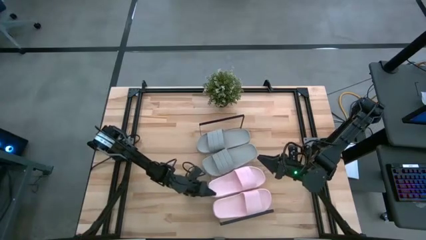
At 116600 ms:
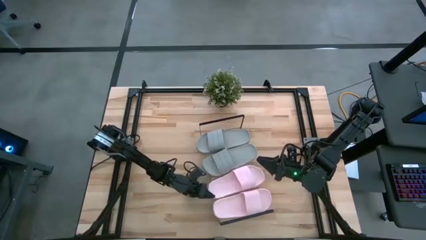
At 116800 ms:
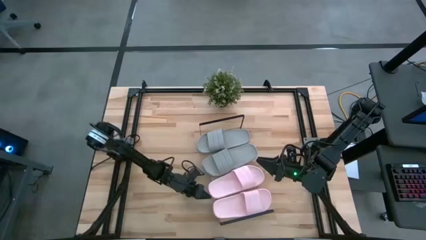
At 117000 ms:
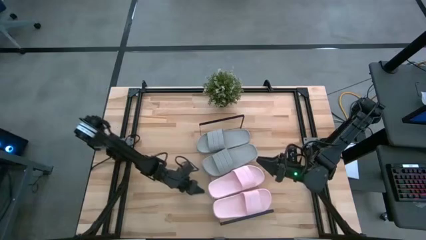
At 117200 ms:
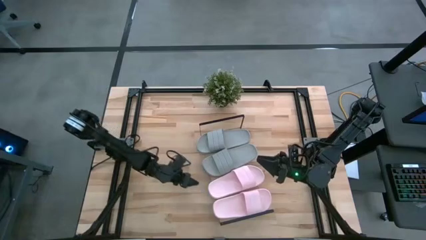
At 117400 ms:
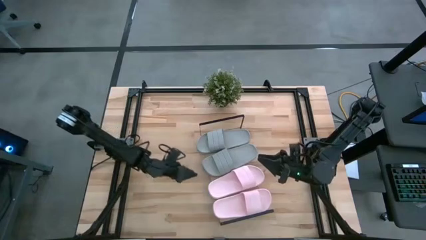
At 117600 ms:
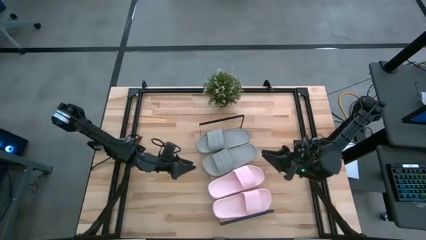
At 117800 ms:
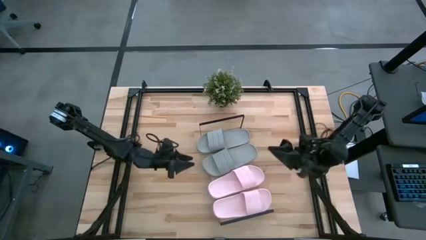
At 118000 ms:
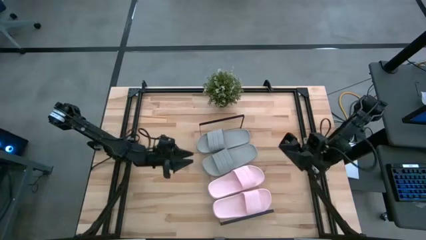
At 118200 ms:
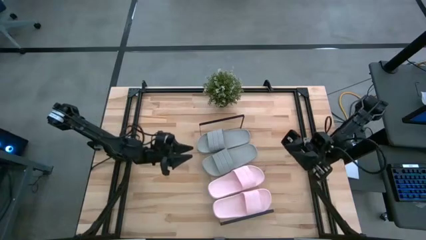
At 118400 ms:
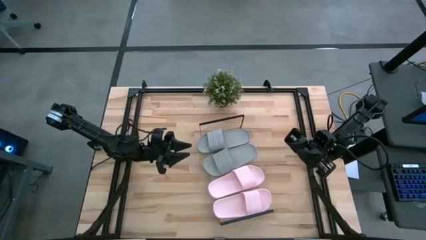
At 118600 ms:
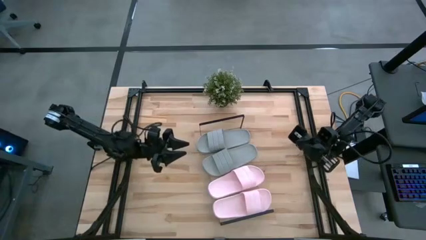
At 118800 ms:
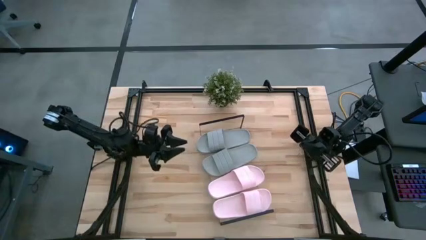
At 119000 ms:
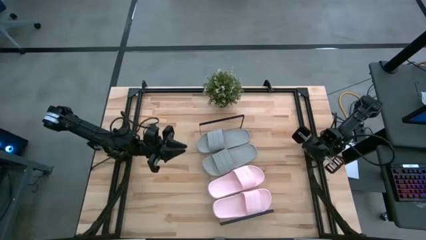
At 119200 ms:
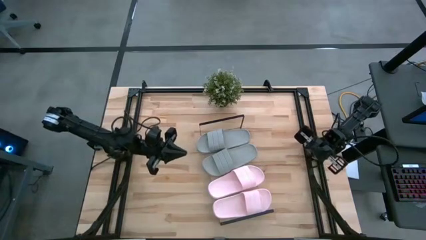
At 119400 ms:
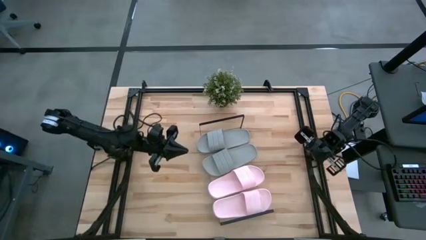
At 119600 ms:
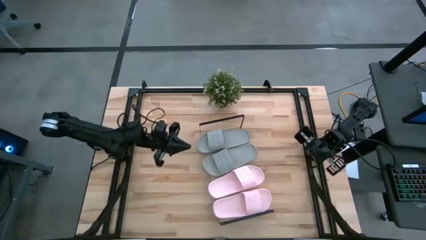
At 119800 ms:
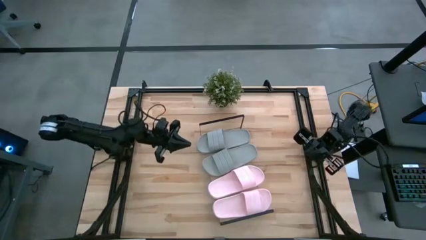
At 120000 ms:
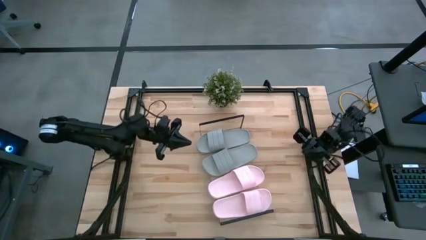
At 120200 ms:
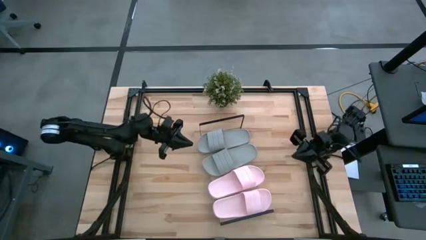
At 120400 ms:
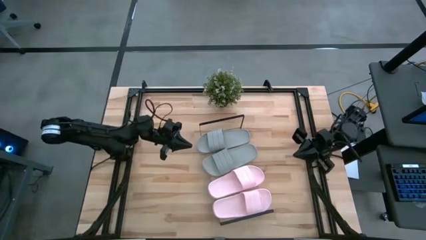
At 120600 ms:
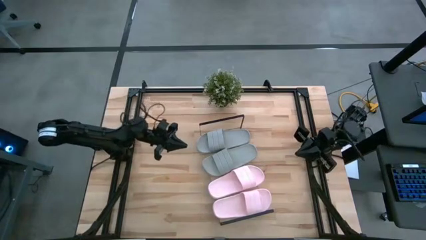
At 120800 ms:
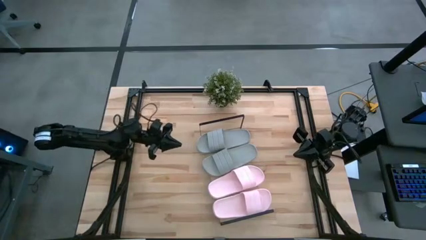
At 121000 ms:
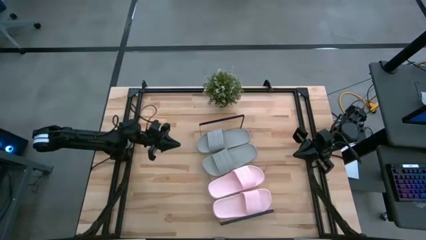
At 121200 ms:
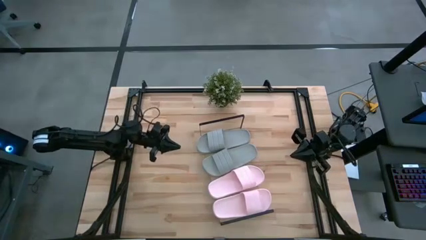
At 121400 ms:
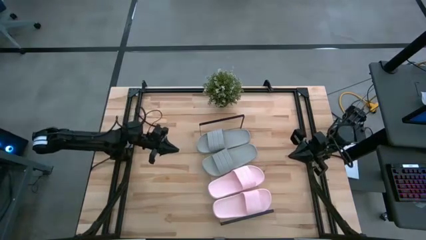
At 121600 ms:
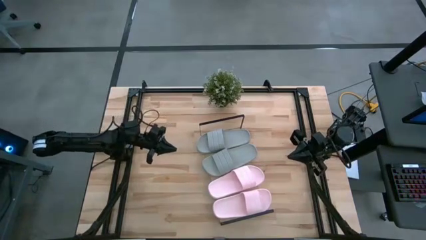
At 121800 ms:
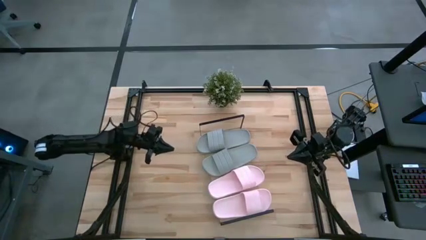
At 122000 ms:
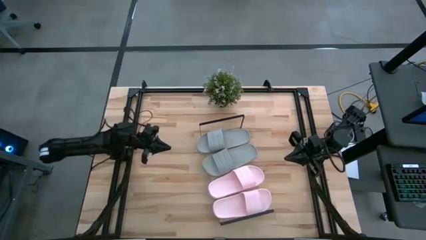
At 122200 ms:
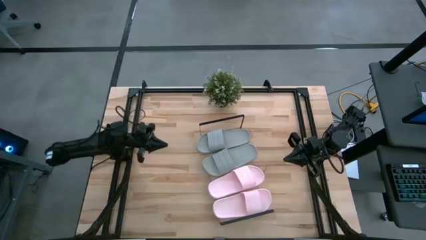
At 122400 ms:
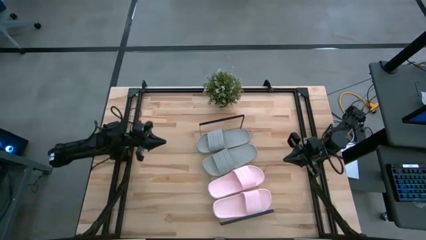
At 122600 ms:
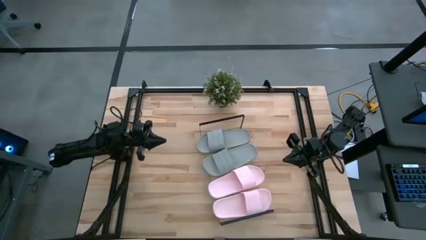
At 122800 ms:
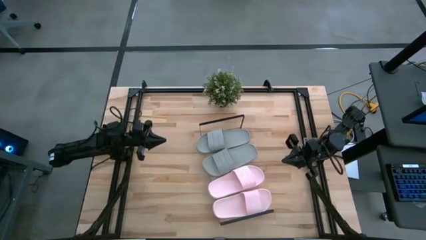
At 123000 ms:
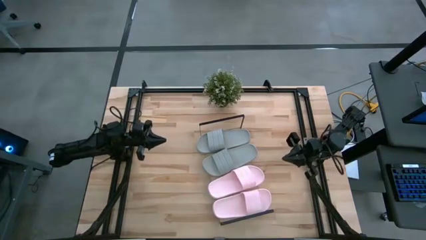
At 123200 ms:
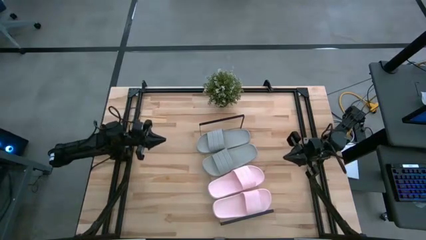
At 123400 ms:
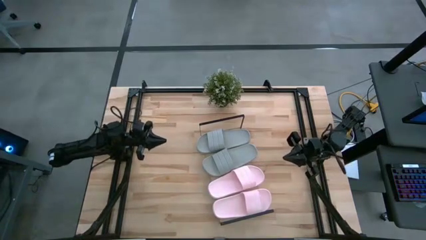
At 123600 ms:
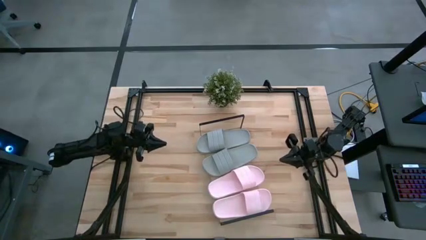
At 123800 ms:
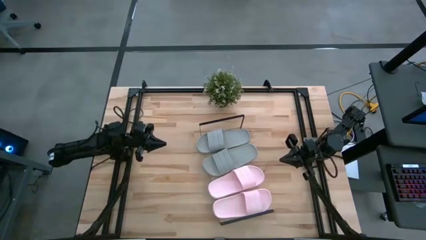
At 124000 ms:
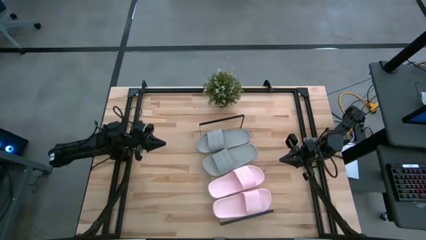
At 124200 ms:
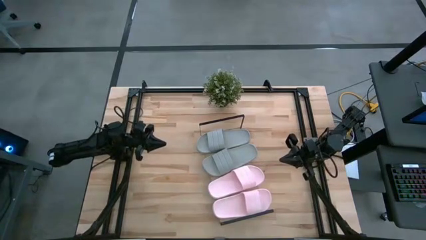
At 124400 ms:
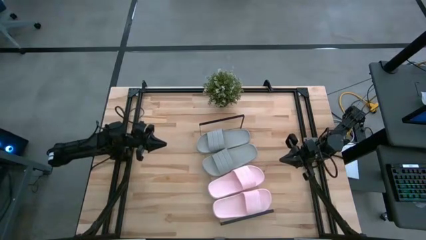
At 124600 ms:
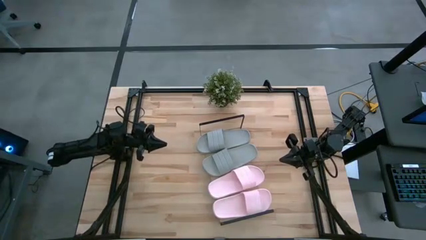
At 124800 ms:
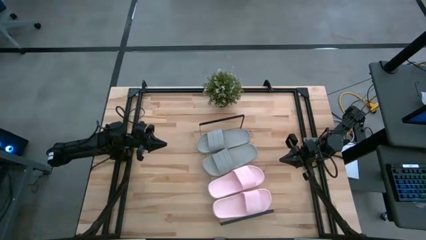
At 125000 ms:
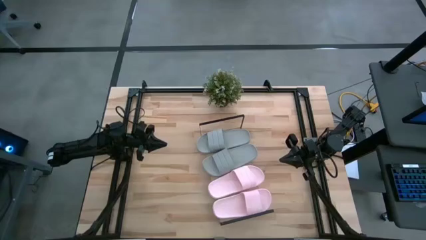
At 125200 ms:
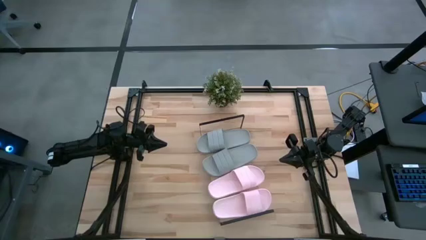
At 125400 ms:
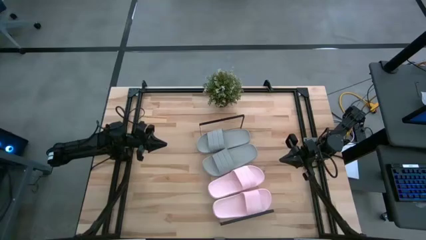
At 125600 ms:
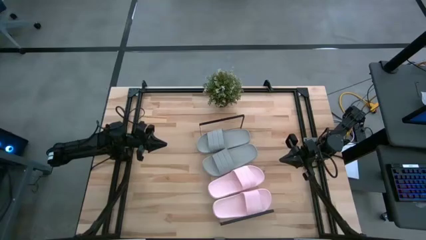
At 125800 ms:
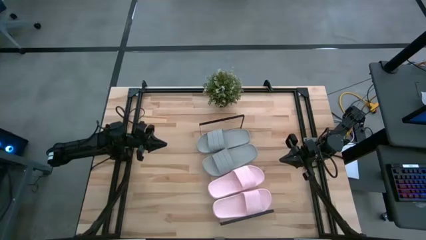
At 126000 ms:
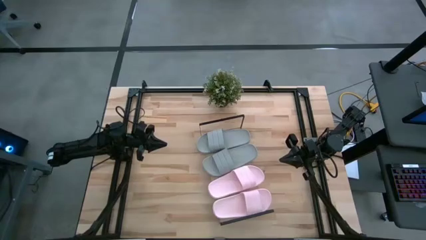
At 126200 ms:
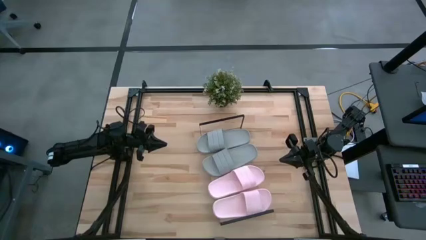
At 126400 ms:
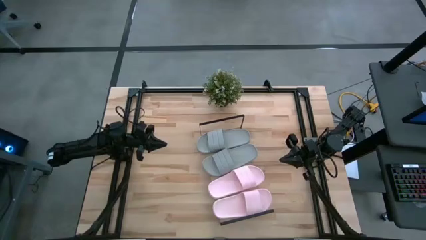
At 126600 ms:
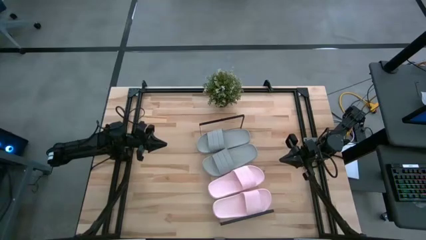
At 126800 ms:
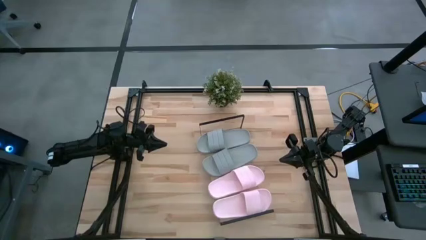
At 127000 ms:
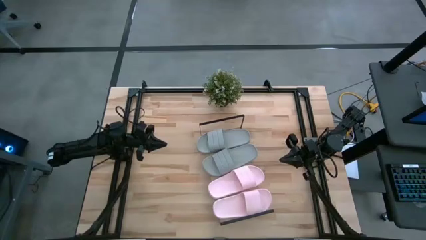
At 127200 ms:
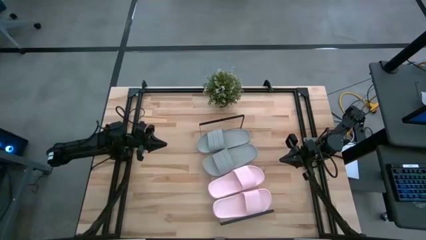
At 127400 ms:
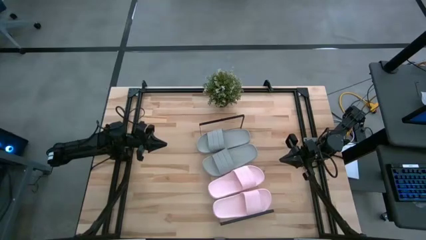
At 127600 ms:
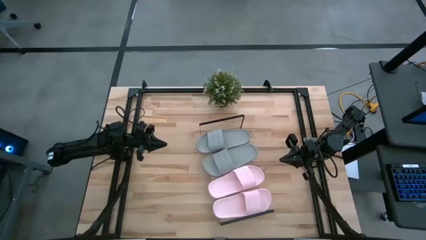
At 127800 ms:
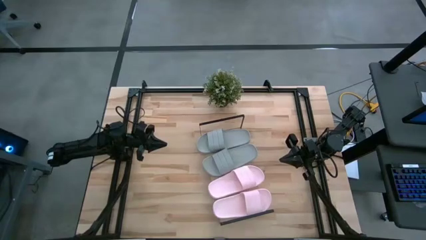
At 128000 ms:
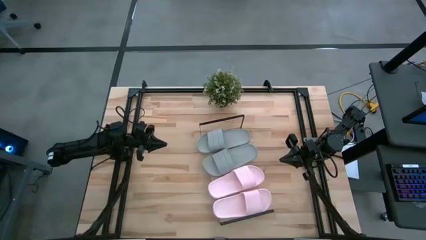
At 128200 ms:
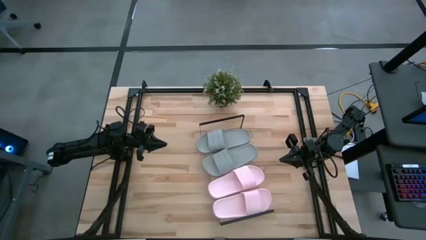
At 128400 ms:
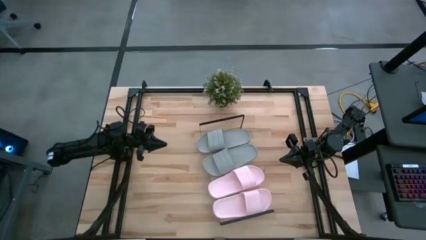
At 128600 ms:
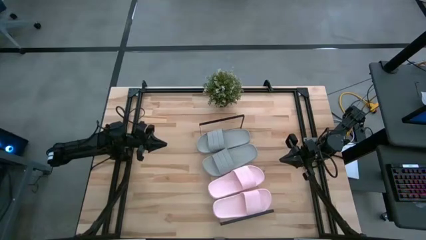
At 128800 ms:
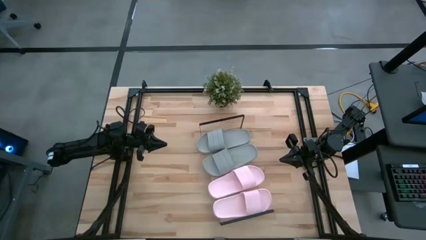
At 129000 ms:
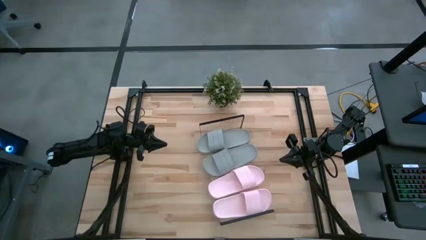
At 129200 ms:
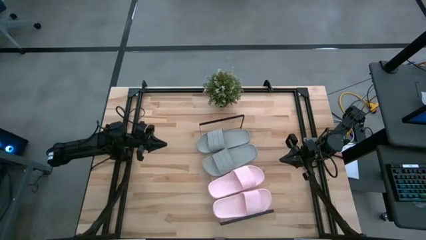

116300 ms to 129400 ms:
Task: Pick and place slides into the shelf
Return to Home Position

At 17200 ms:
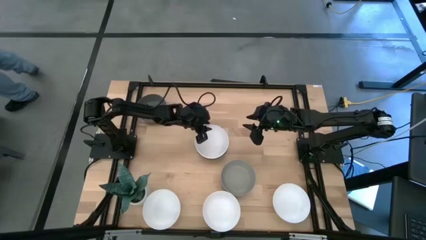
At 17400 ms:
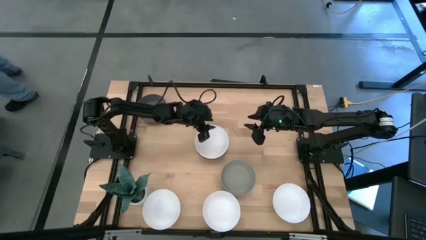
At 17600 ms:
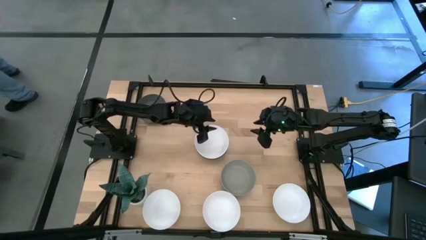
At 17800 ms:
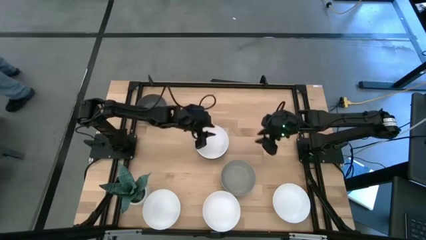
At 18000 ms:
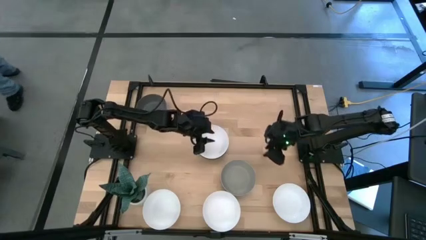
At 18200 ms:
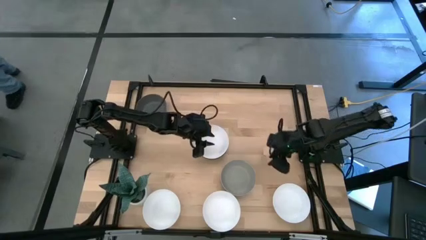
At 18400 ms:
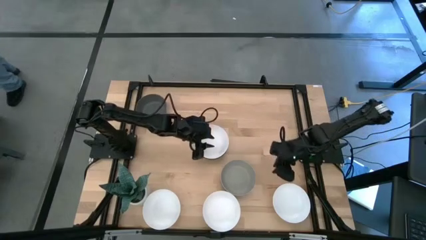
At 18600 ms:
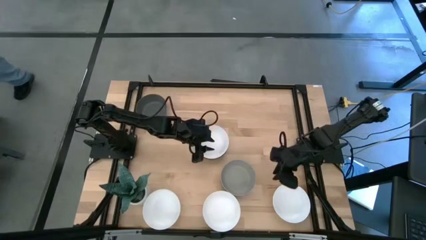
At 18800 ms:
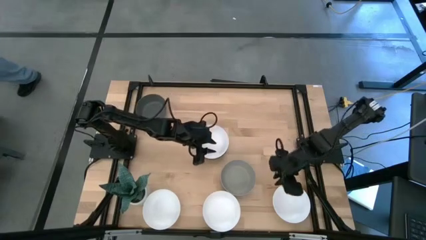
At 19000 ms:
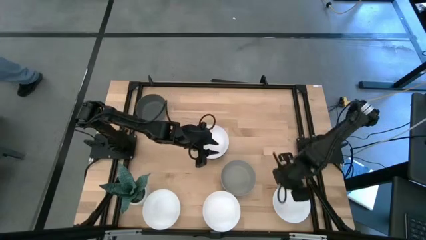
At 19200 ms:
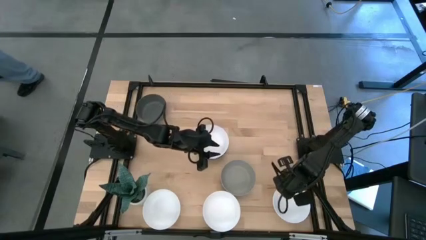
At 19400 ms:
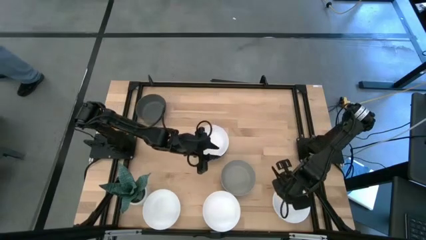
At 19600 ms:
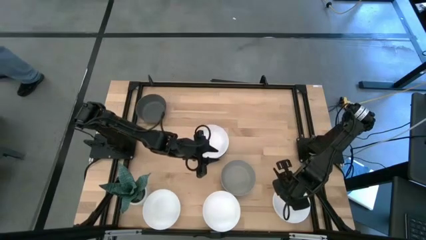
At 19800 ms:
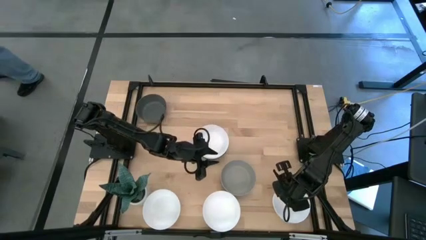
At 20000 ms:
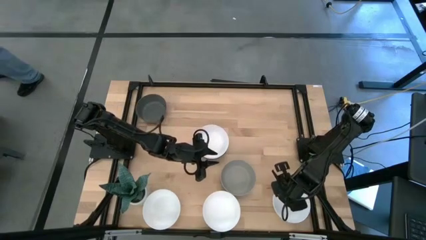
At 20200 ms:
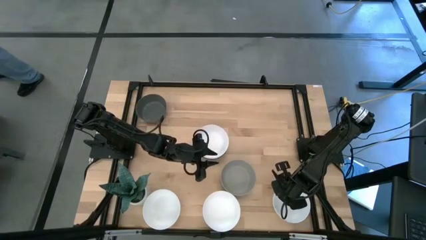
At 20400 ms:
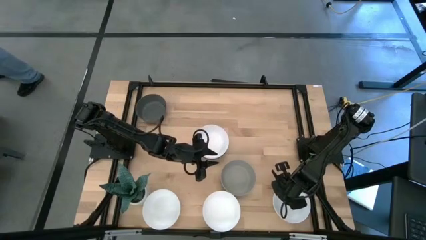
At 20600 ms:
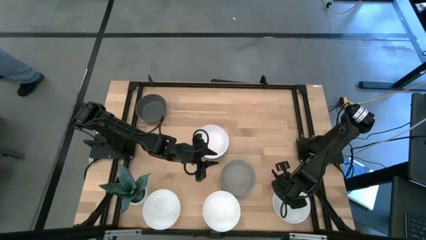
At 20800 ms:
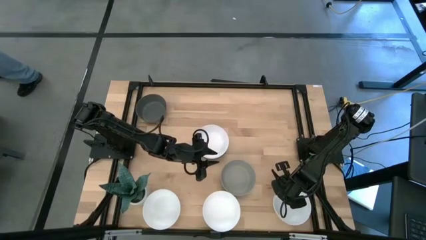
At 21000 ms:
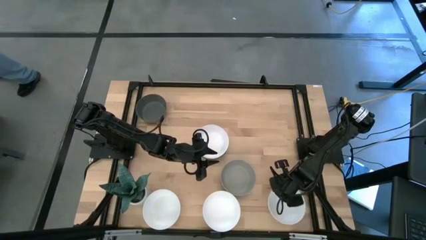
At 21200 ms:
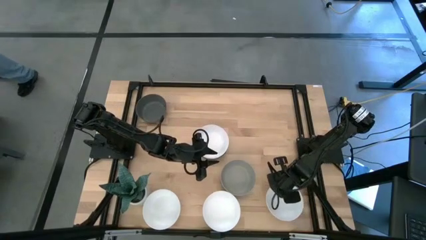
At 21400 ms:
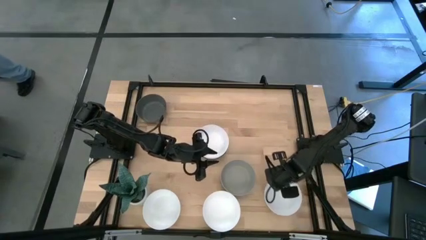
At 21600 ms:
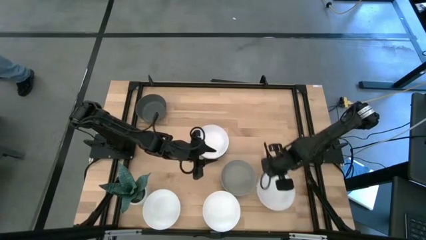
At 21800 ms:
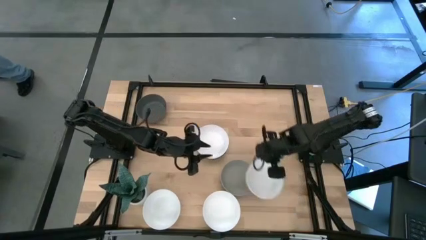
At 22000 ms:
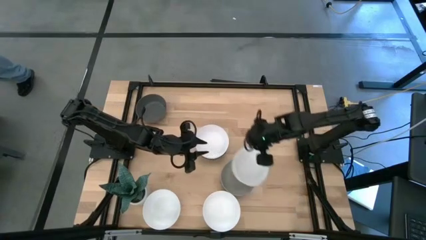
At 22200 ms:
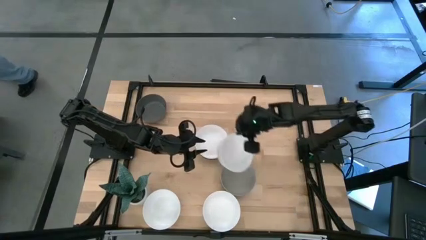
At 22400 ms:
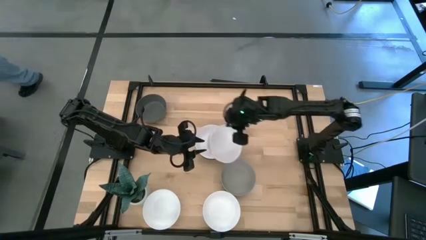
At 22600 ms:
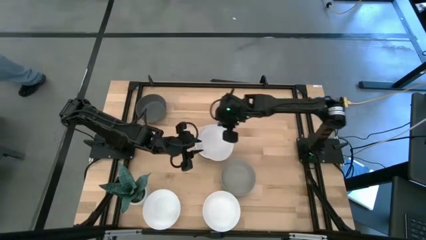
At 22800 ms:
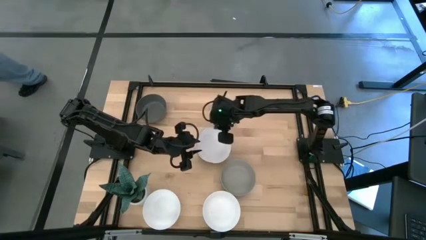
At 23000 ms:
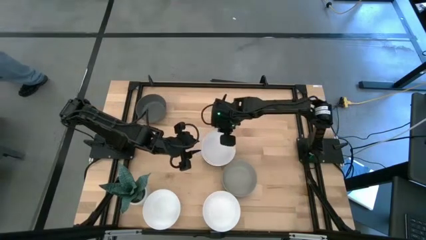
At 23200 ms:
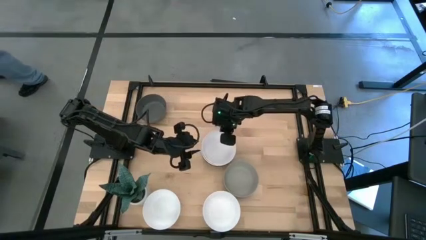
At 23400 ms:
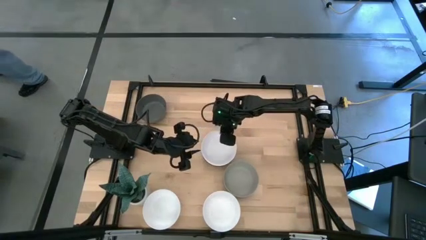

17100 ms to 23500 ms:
Task: Nest bowls inside each other
Stack the white bowl on top of the white bowl
